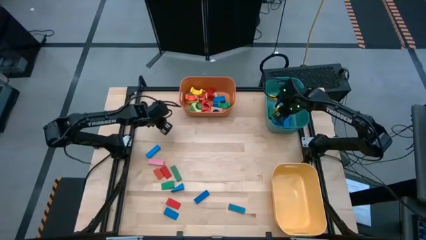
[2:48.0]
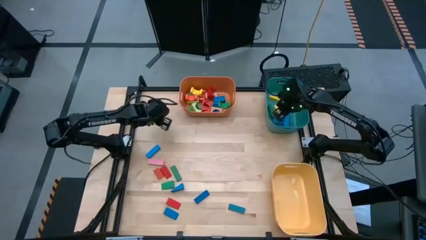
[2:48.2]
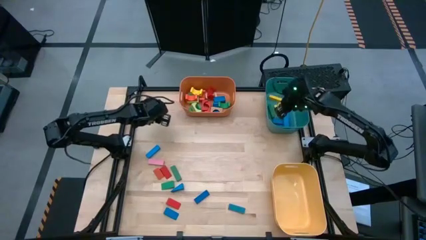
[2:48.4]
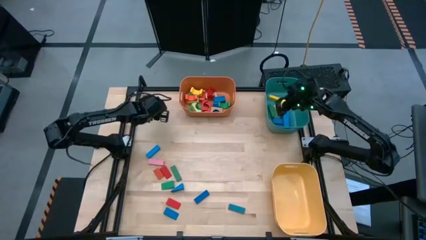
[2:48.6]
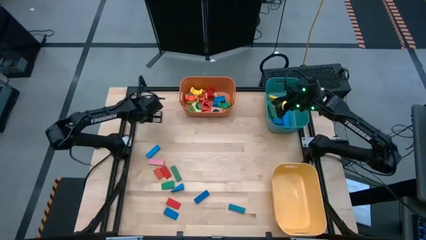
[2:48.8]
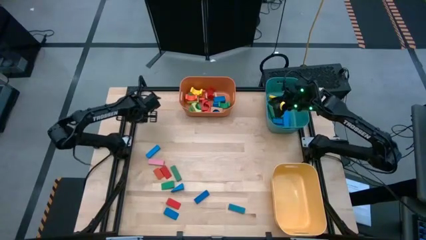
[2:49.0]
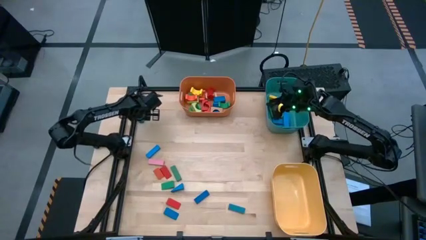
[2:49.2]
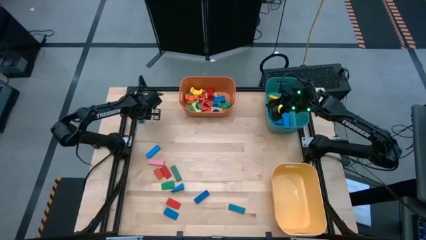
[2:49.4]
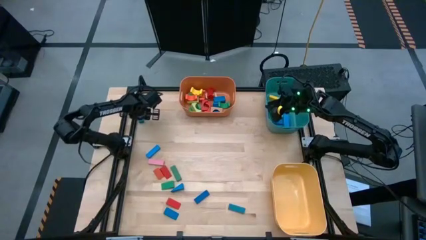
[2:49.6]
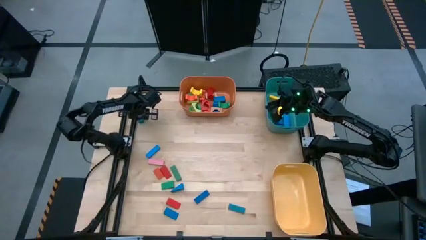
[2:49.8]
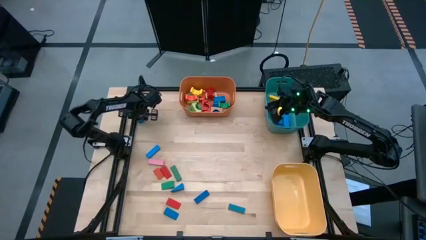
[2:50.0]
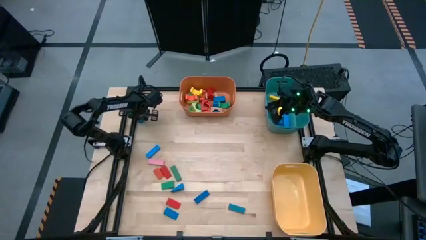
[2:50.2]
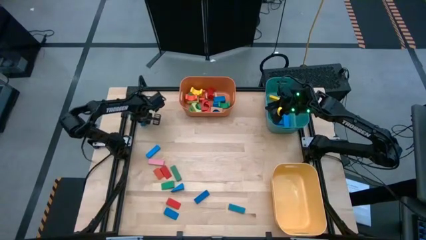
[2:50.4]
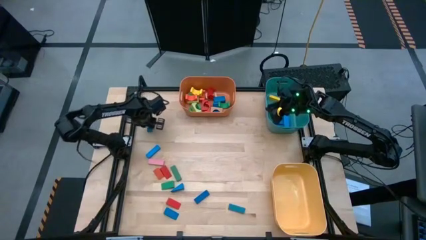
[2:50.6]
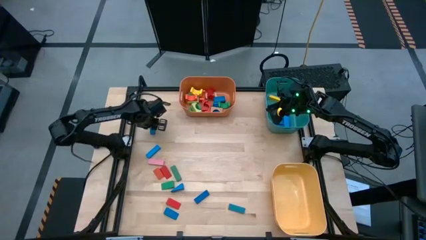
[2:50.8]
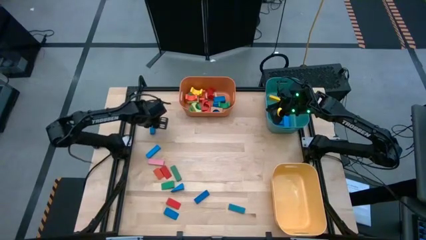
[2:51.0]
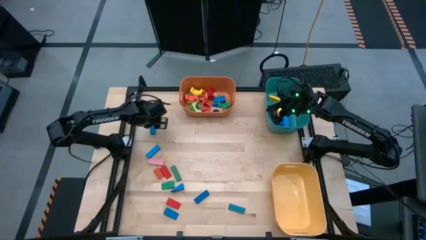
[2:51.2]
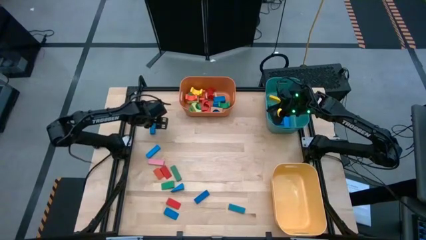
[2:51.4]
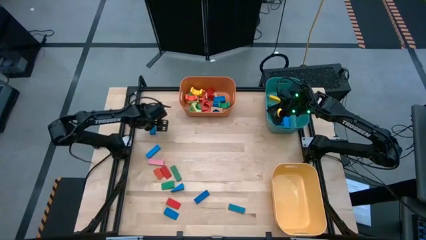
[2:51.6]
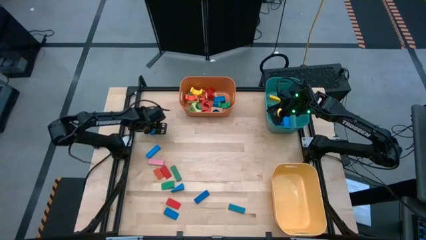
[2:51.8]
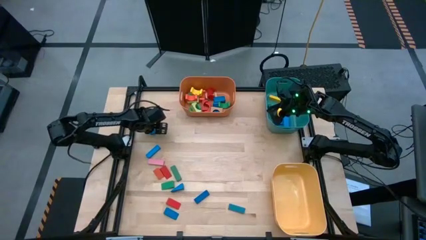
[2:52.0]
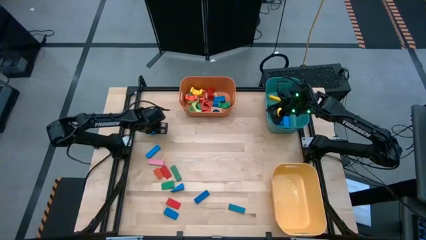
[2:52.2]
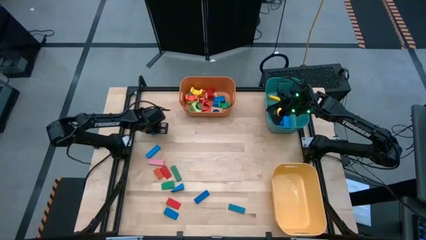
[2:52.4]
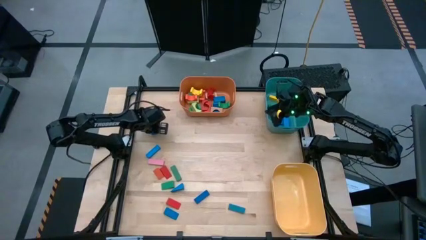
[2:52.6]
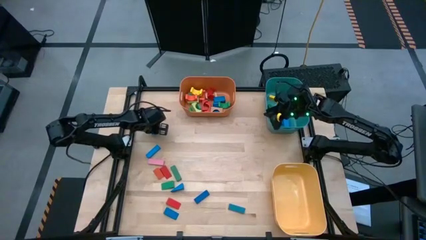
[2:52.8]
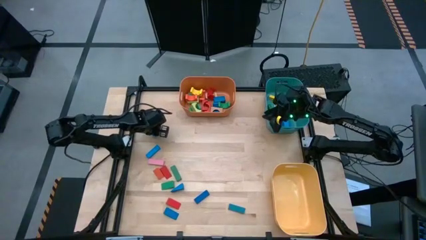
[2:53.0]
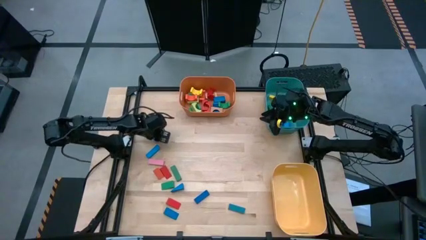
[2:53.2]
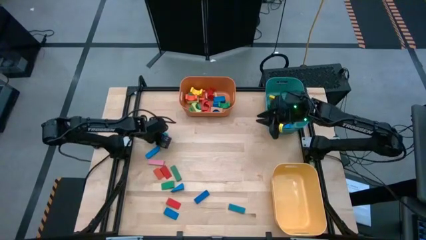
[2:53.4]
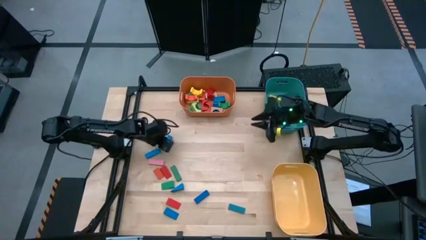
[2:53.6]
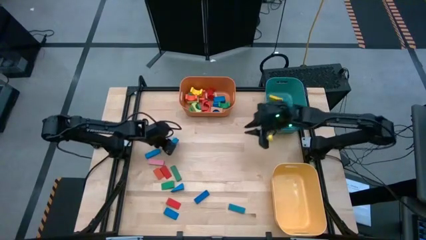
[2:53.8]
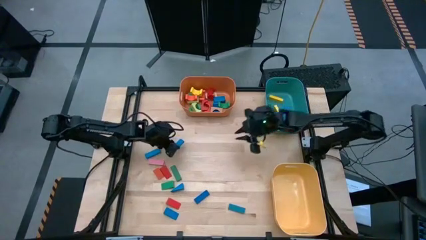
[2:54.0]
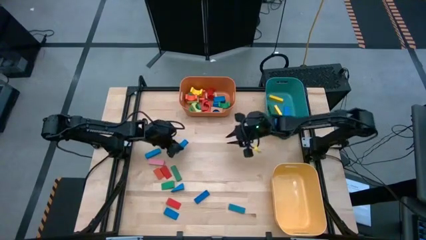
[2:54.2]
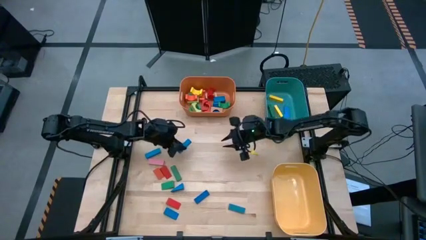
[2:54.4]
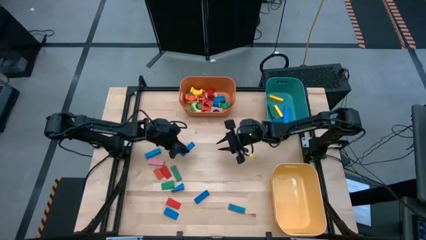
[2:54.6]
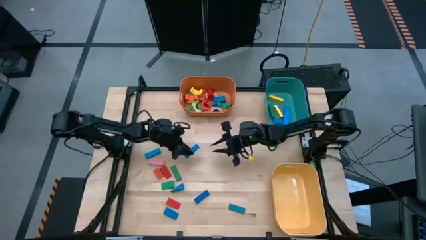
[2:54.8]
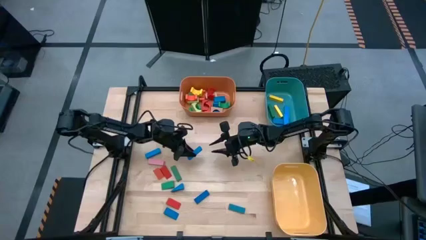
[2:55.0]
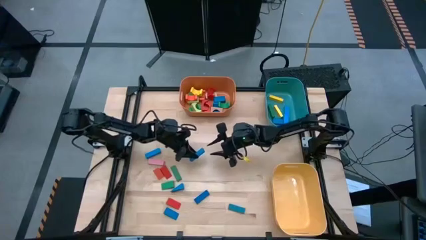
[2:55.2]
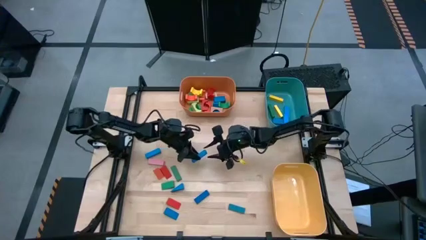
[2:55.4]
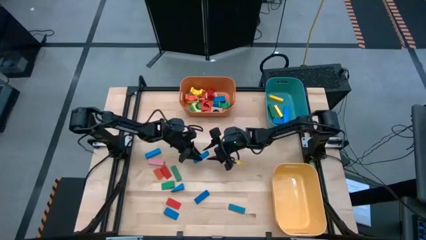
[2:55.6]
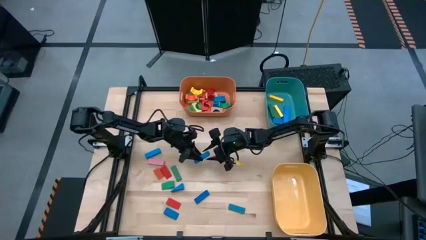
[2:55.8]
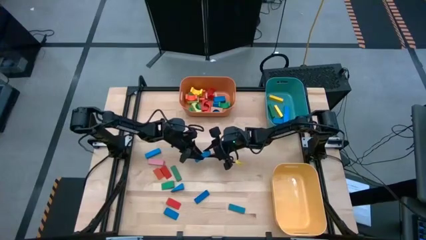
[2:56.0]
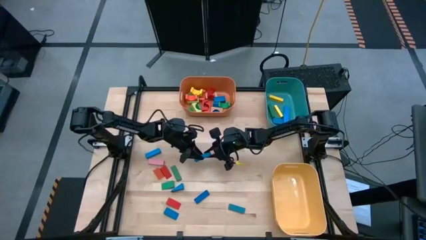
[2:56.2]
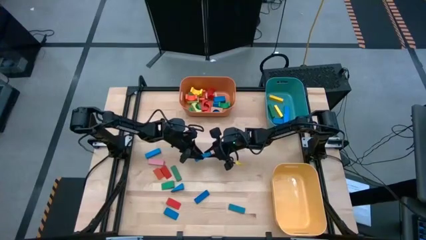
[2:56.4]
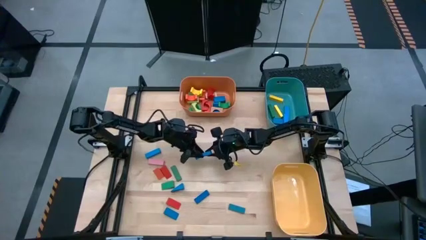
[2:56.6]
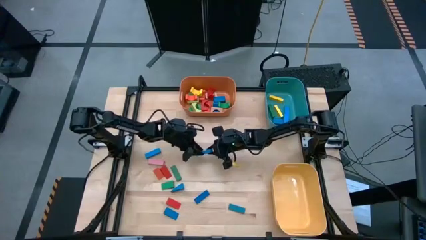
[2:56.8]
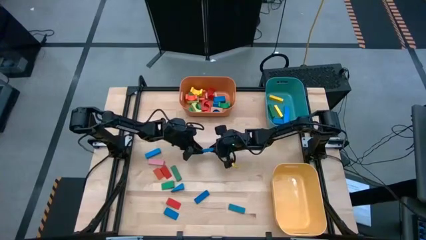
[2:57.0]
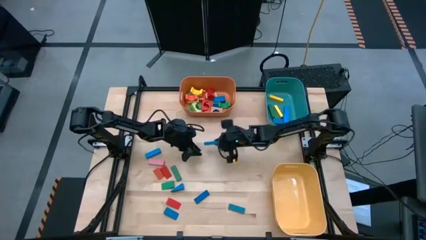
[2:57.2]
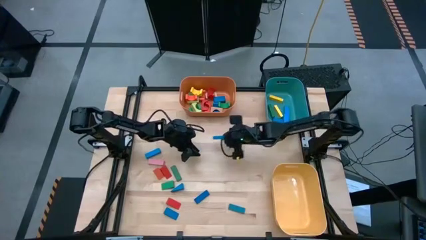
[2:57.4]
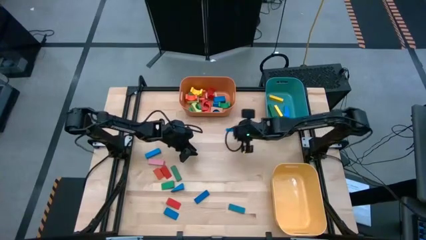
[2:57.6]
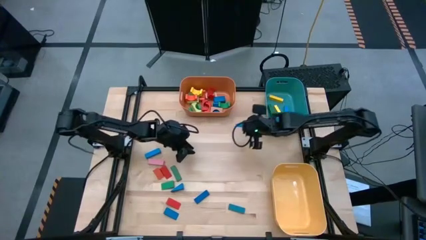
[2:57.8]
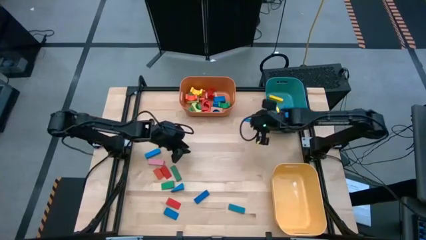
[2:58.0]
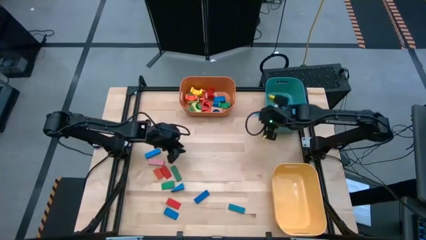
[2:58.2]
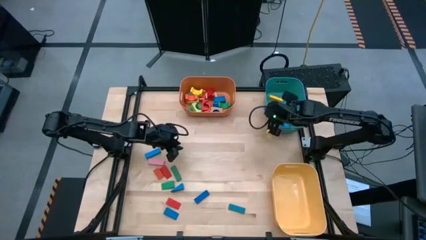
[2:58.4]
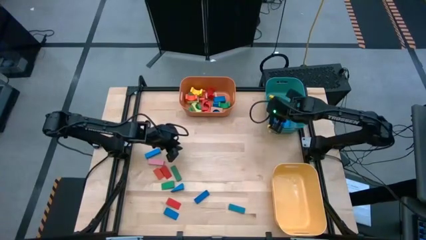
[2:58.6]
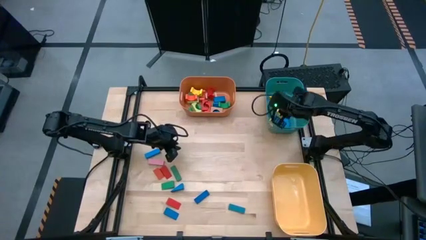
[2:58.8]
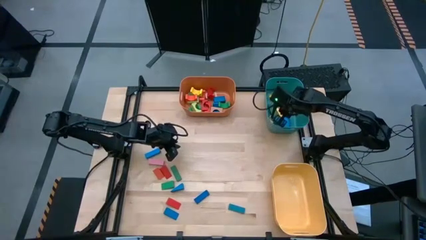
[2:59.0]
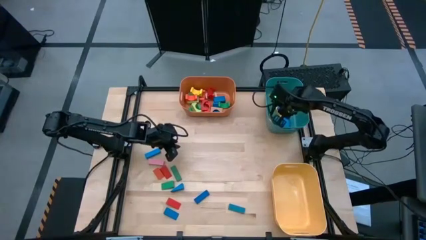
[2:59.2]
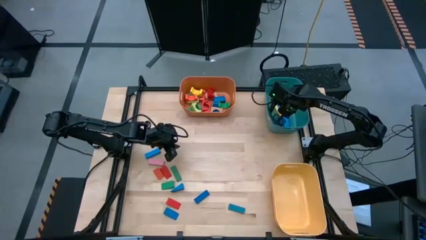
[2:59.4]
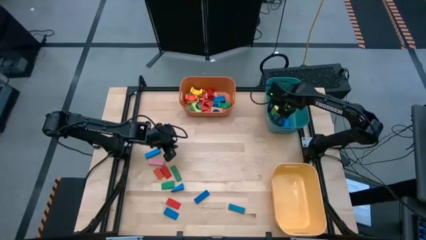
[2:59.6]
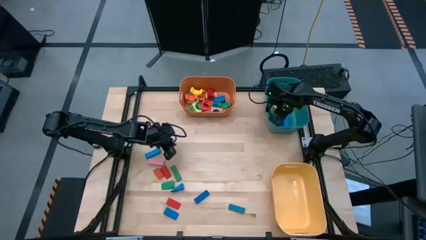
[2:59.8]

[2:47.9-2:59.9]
Task: Sort blocks by size
Put the blue rectangular block into the green bin
